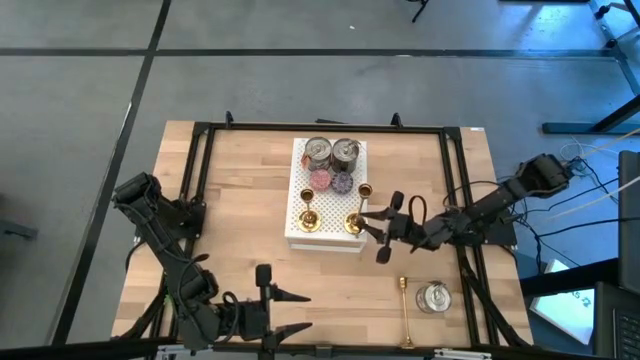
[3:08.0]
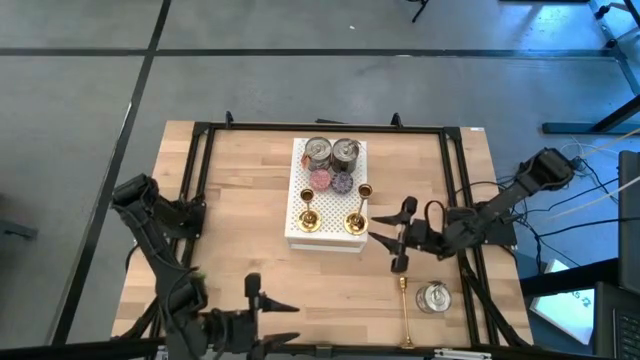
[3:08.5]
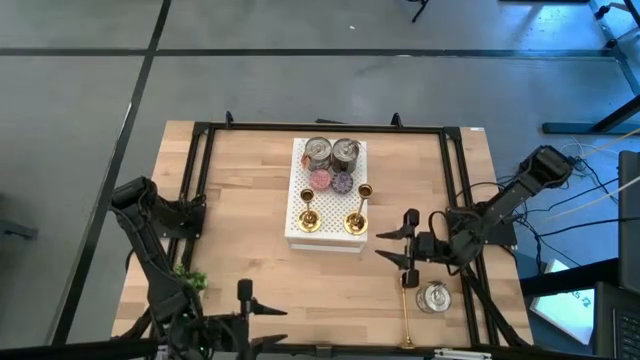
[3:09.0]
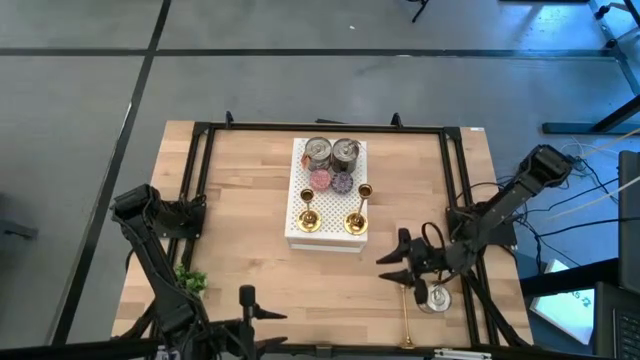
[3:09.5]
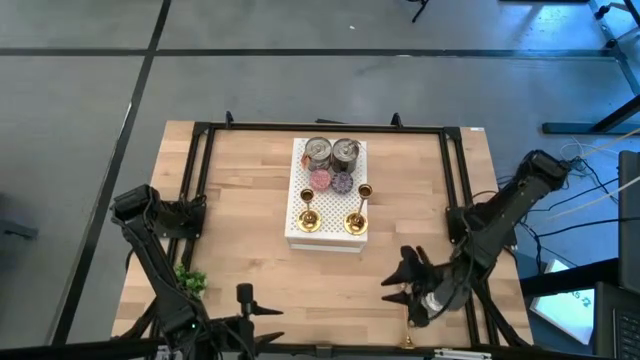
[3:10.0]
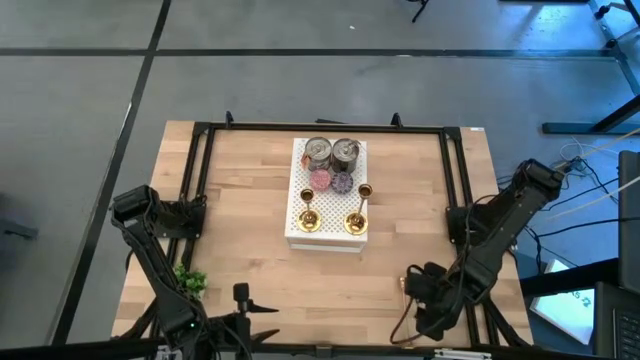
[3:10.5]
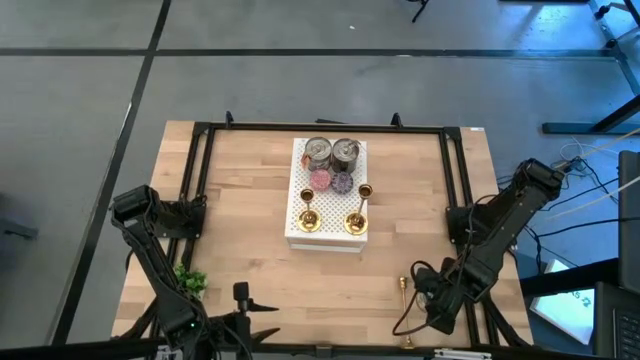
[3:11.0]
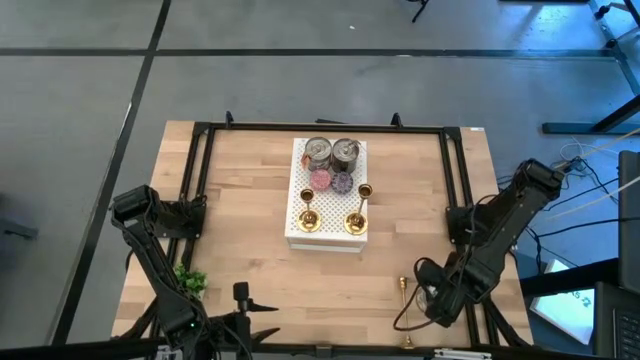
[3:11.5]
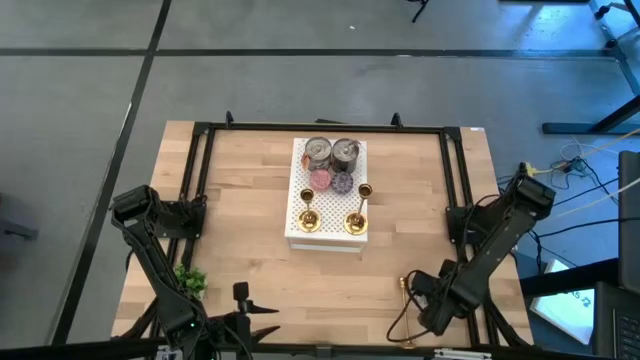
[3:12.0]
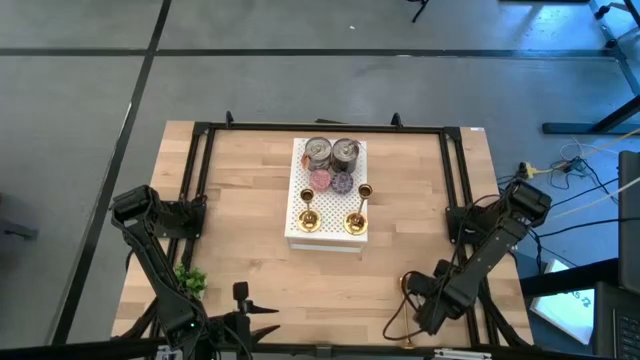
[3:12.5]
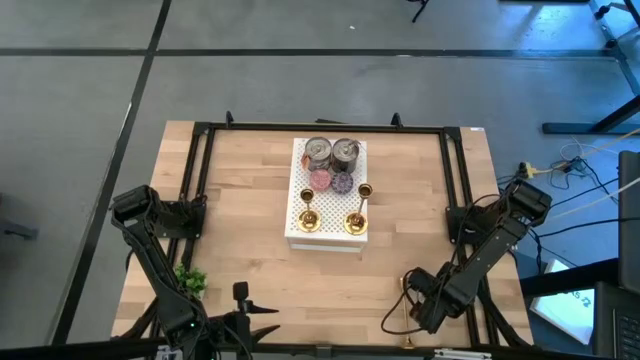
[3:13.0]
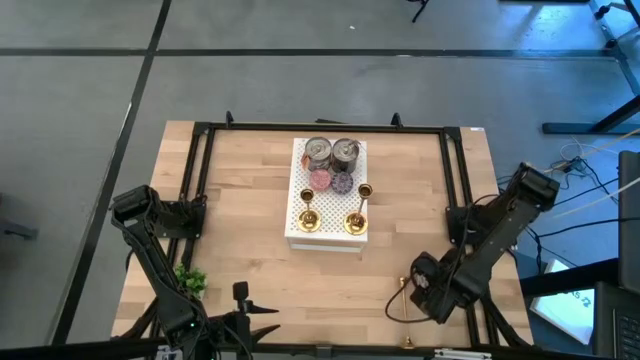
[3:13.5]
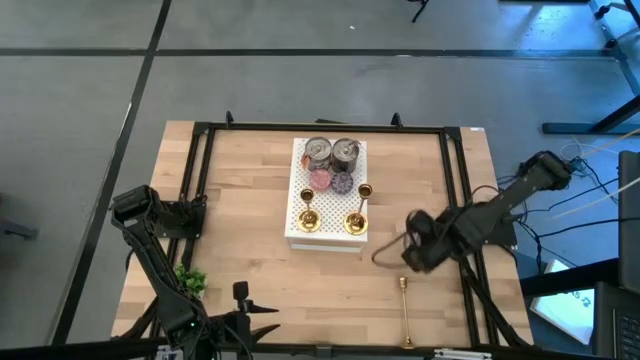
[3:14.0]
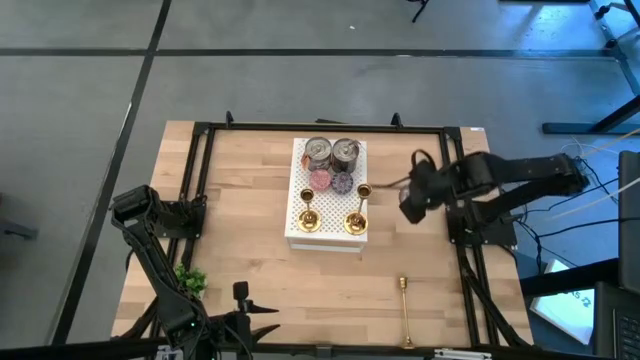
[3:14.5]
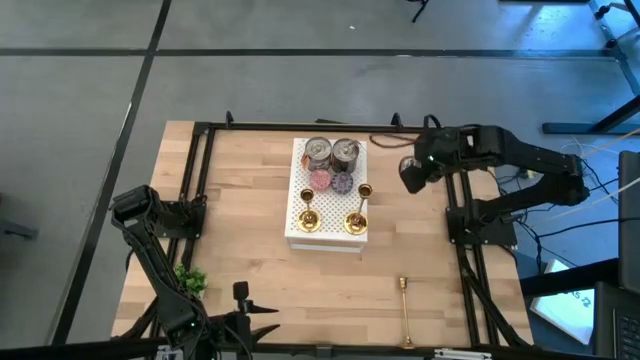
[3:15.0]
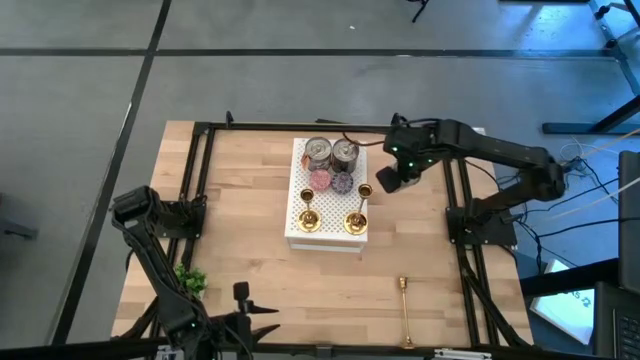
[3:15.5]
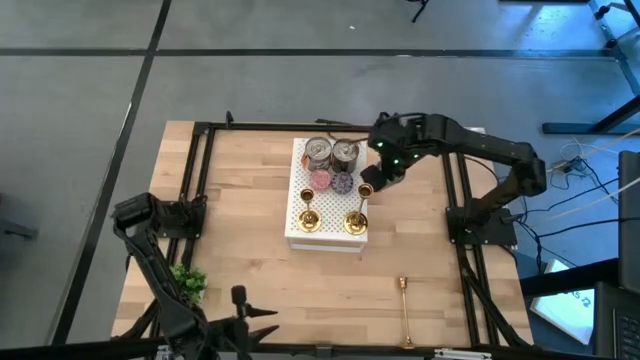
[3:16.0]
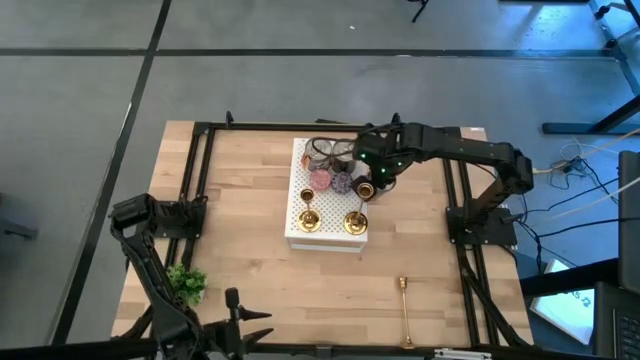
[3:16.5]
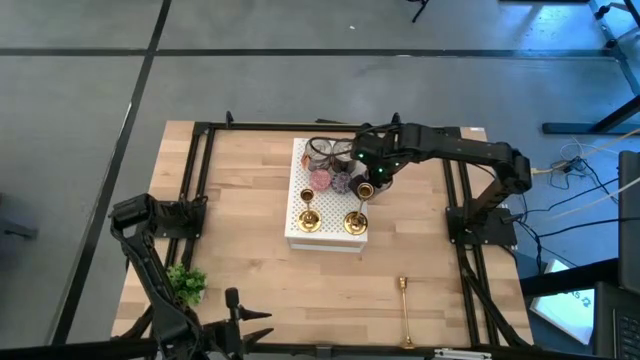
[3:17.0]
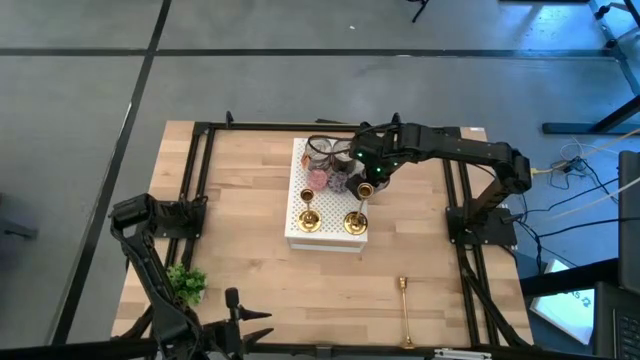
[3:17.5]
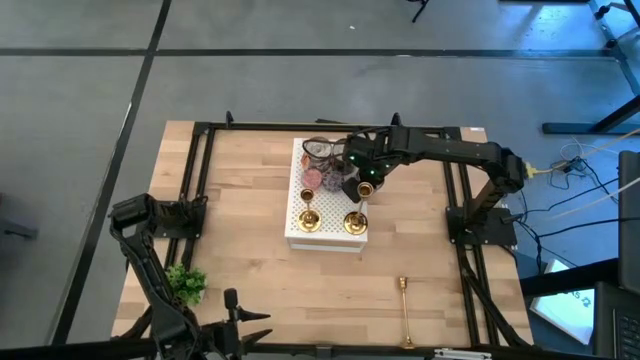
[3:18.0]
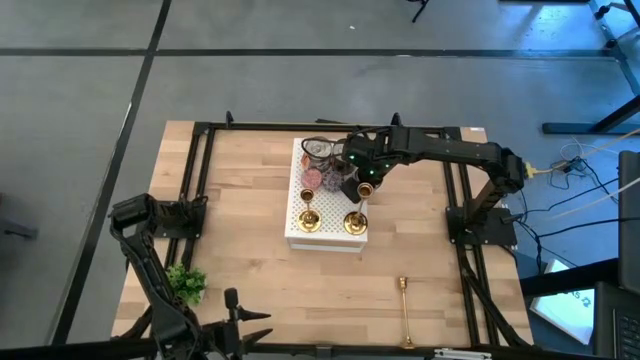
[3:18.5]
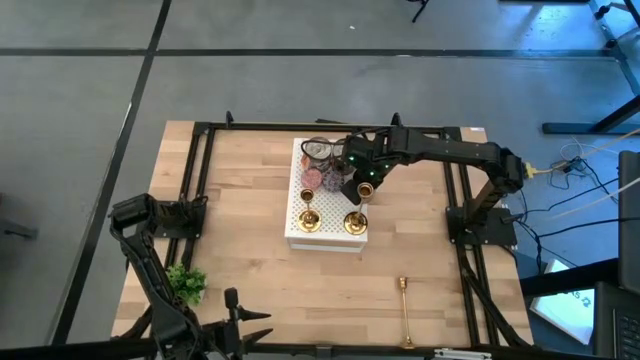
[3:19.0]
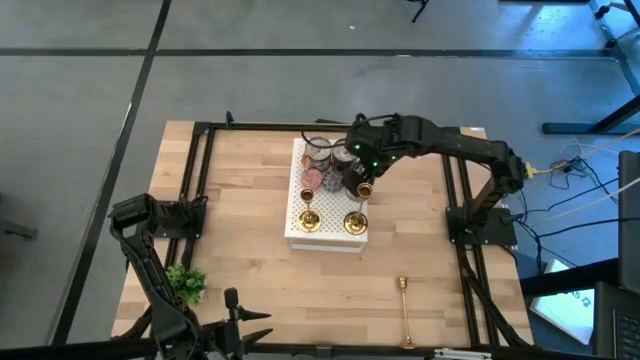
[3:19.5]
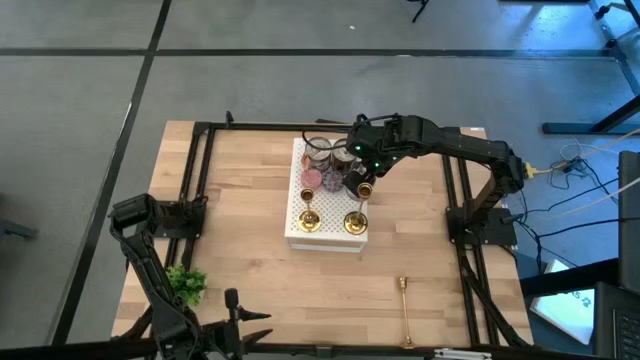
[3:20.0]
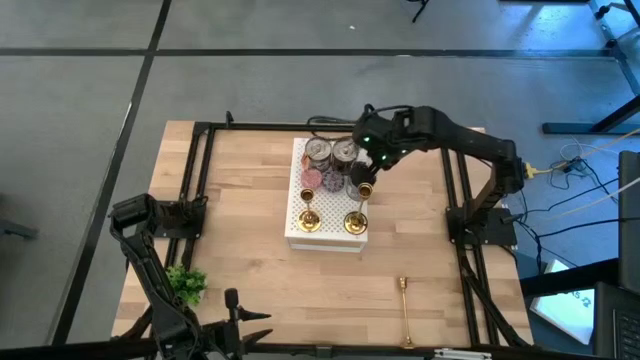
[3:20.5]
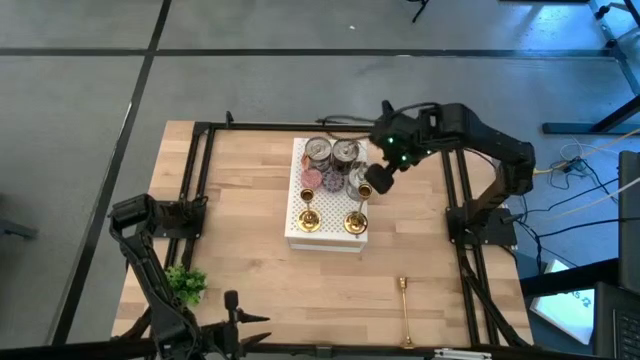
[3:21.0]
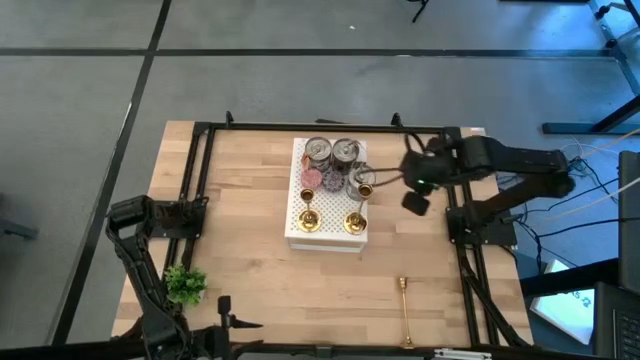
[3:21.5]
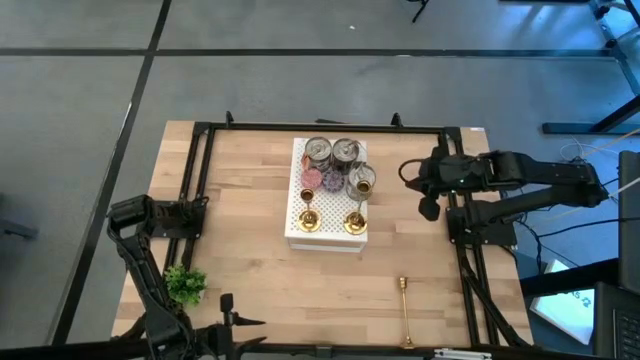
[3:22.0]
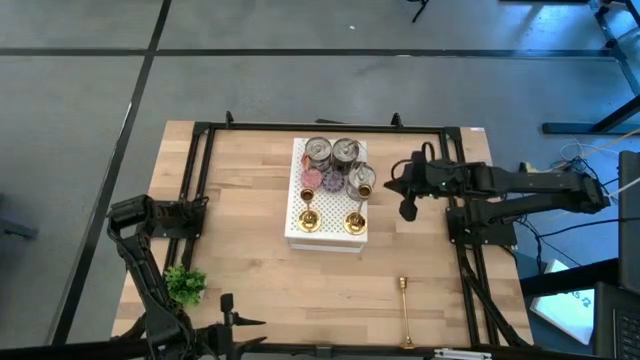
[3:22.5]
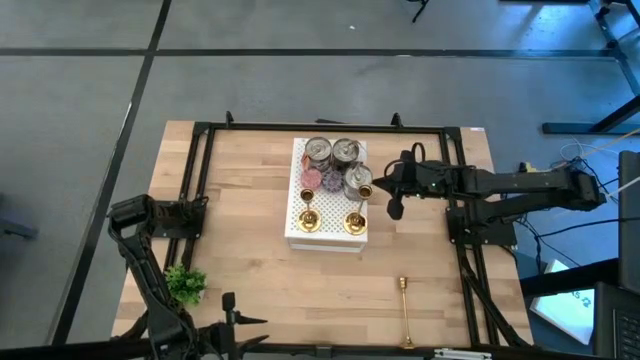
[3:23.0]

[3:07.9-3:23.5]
Task: Pick & Place candle stick holders
Put the silver scented candle on the shelf

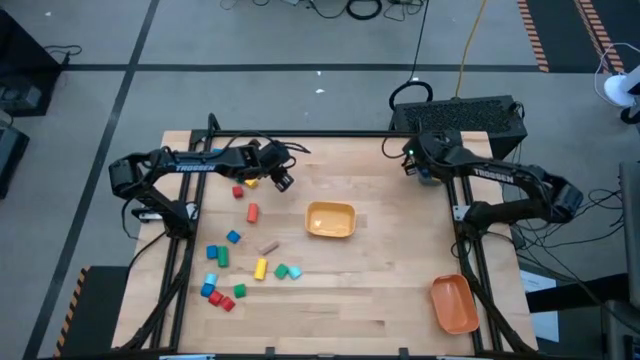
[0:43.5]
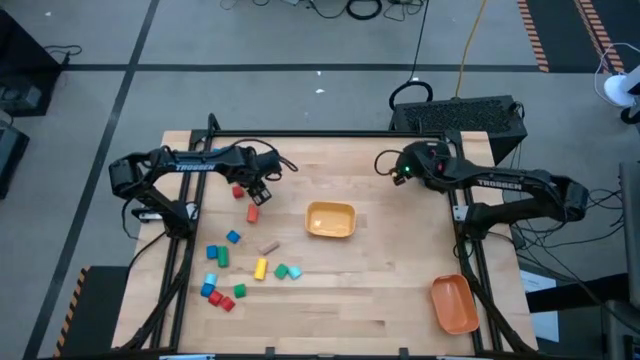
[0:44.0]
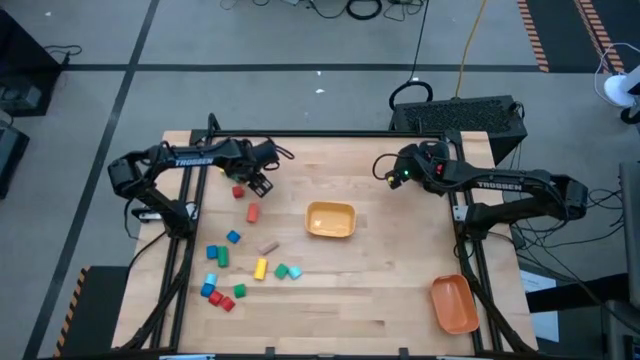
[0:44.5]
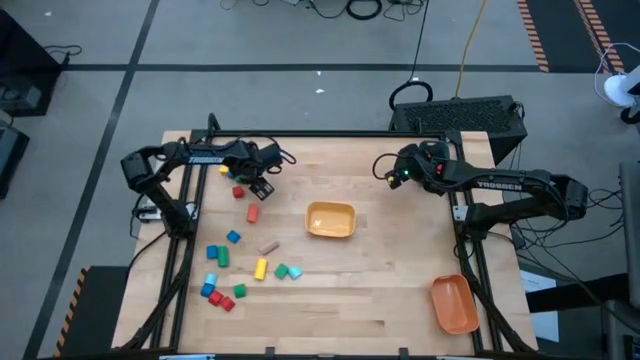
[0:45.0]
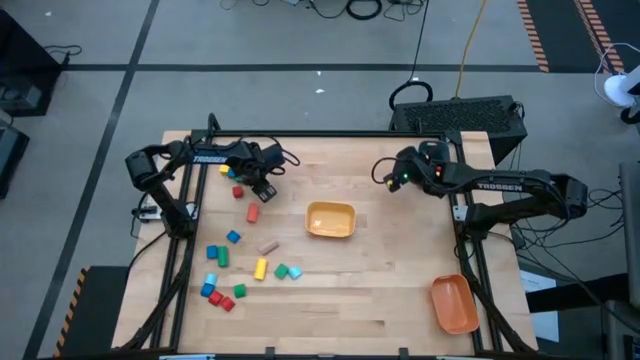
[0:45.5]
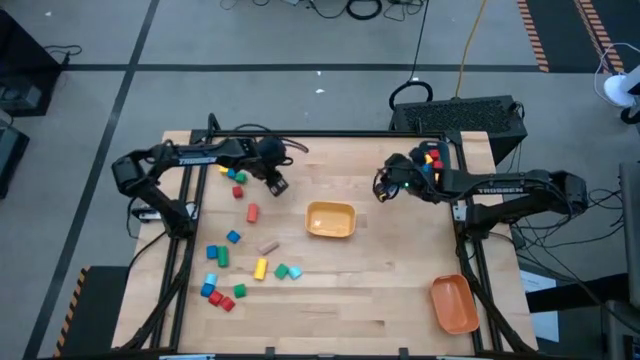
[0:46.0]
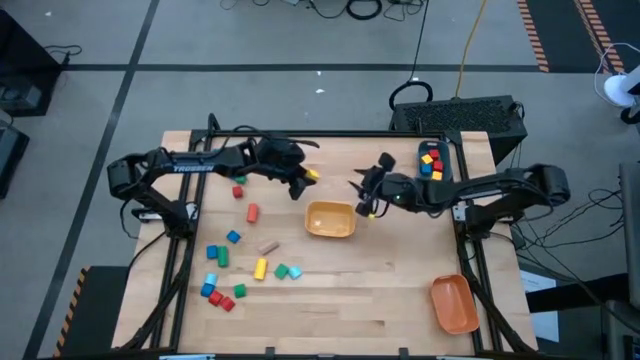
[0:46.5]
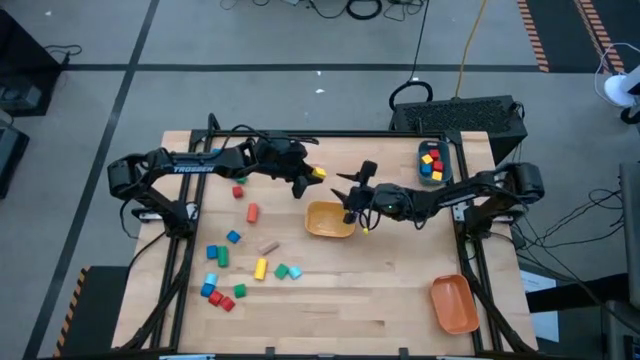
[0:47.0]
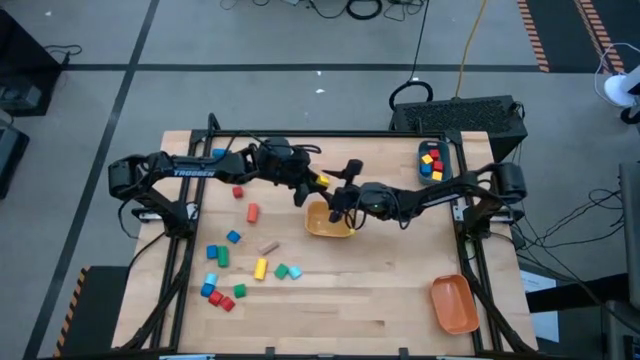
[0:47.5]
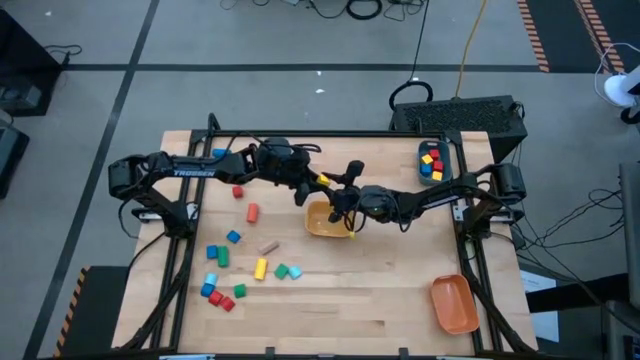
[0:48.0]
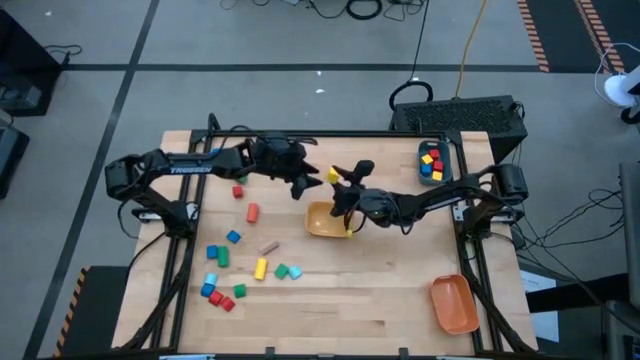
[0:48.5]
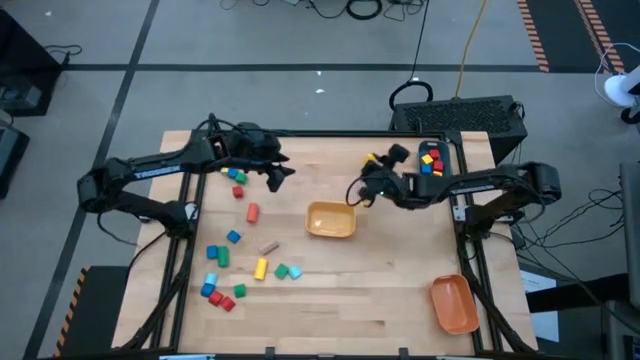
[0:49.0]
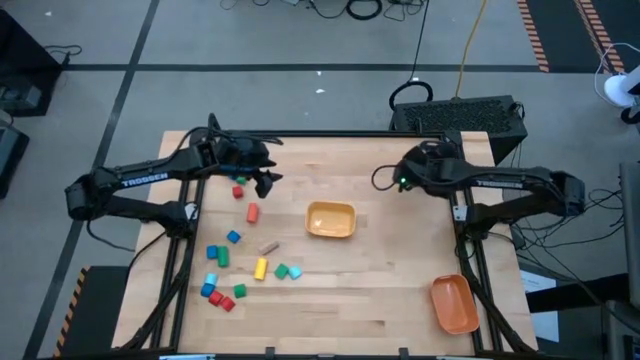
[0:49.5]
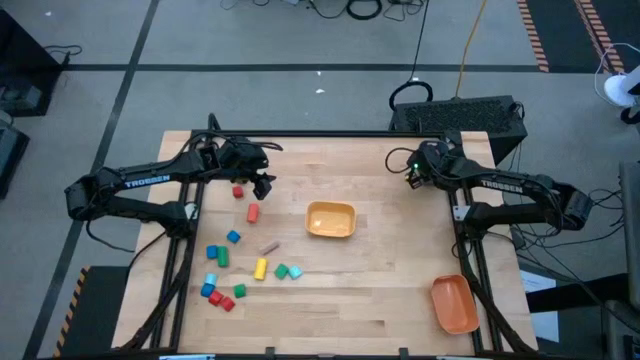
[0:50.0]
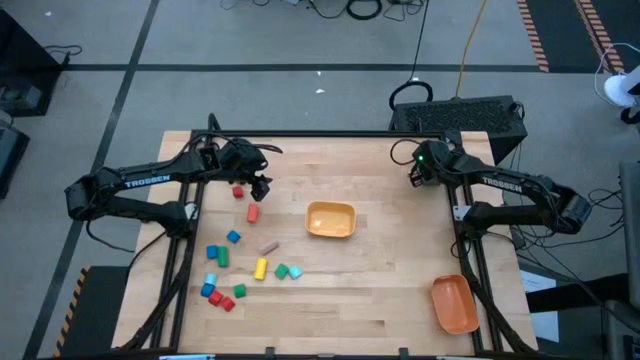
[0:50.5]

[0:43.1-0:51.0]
Task: Sort blocks by size
Put the yellow square block into the blue bin
